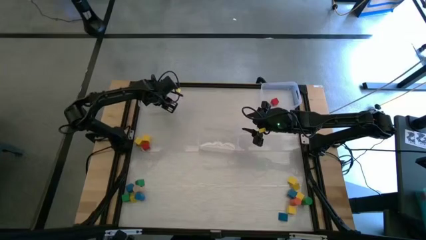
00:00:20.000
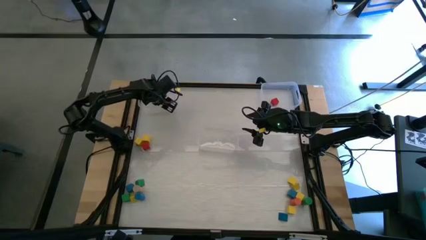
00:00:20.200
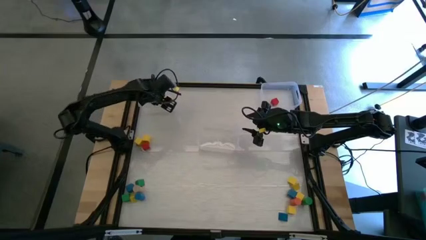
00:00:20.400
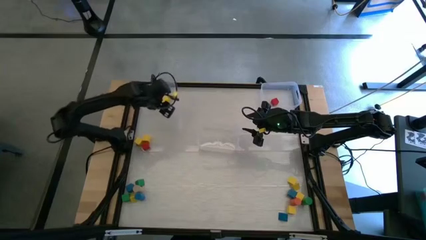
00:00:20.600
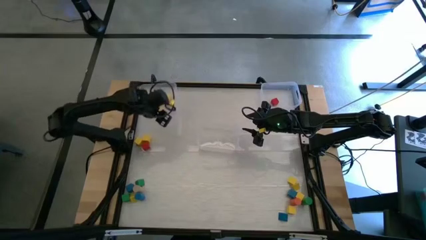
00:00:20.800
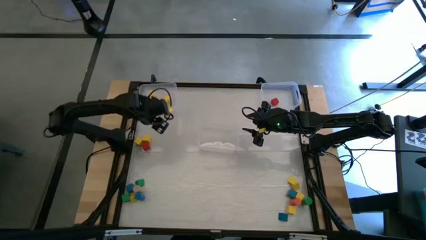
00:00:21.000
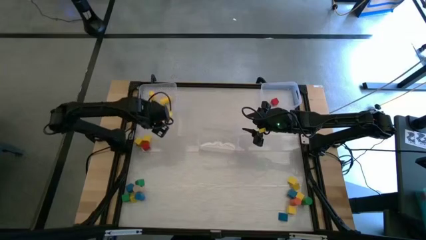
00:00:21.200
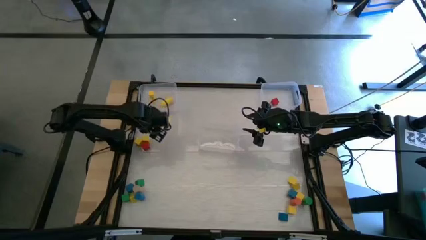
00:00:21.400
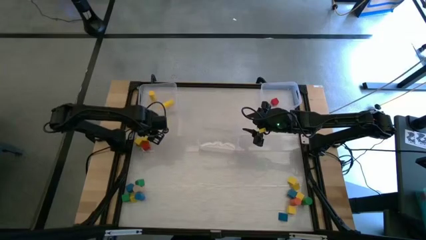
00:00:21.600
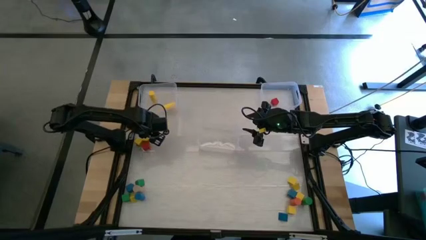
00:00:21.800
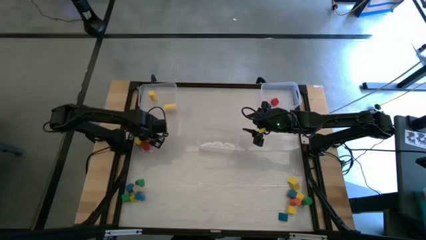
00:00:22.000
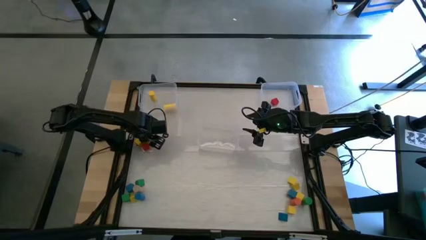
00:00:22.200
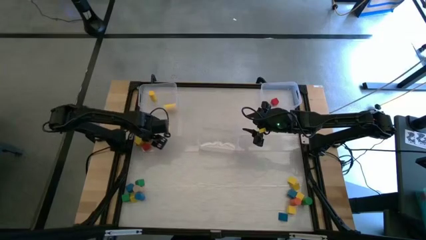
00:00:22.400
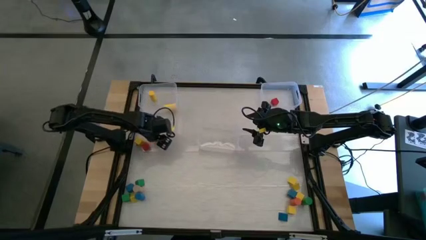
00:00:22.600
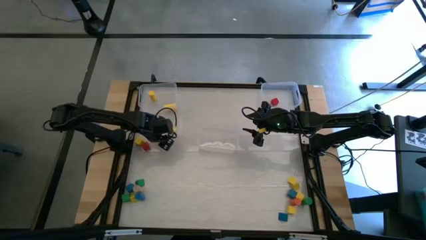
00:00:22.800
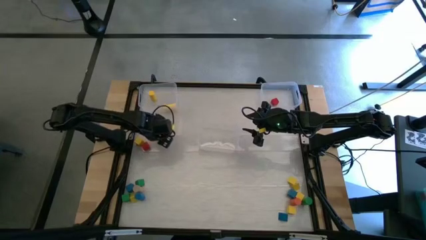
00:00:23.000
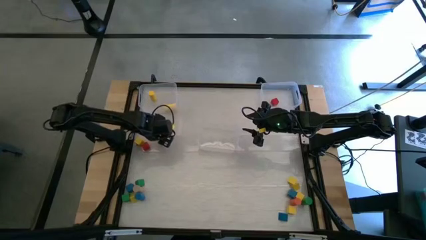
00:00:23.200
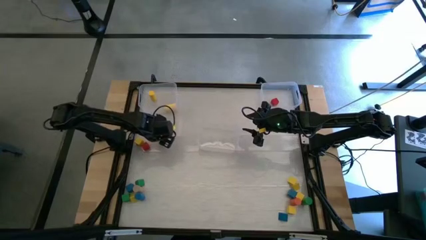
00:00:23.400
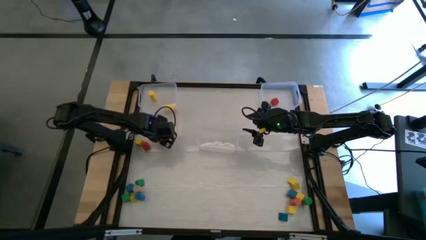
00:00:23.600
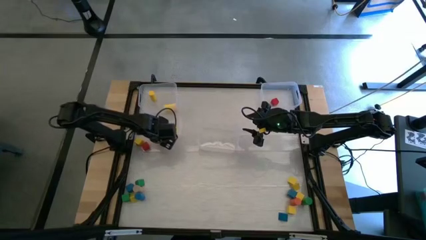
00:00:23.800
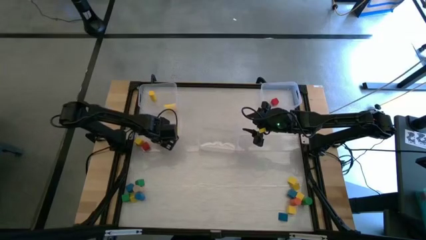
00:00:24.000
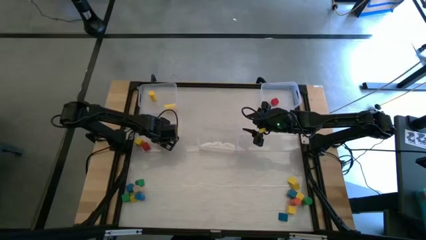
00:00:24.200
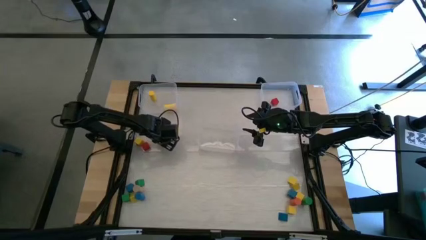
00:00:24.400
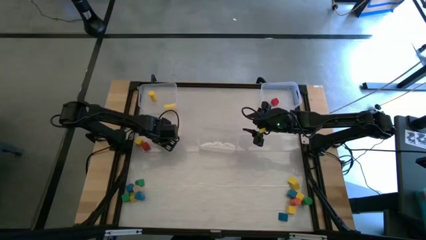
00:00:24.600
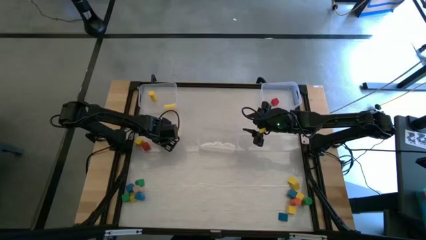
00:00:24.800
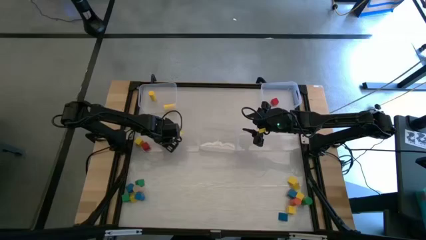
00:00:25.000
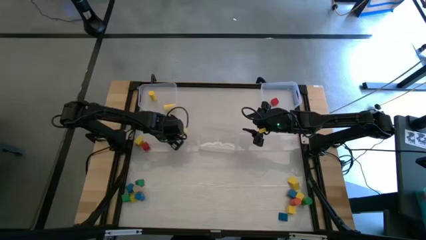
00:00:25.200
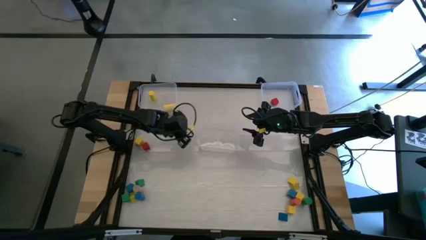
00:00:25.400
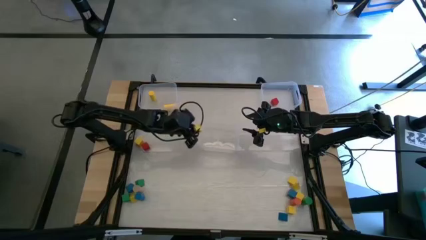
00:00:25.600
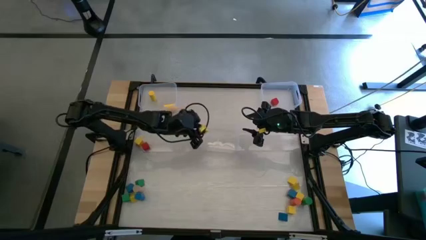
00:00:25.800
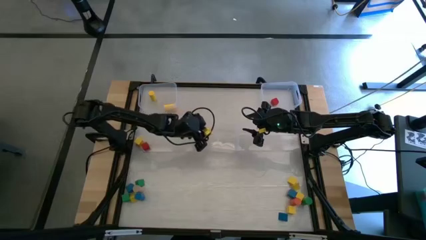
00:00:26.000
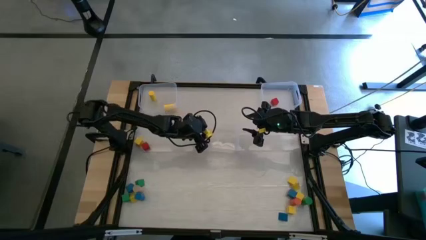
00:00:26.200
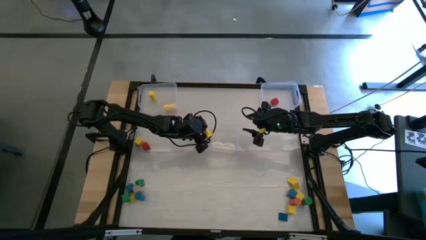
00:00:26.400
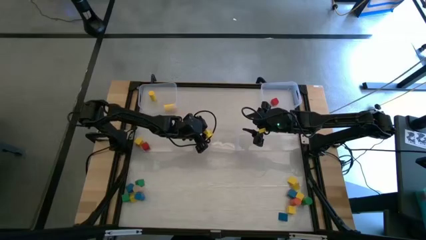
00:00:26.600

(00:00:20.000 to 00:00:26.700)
Task: Sort blocks by size
Put the yellow square block into the bottom transparent bin

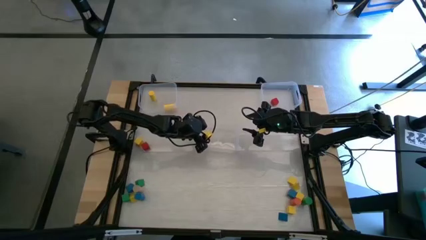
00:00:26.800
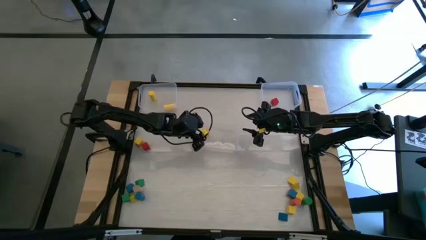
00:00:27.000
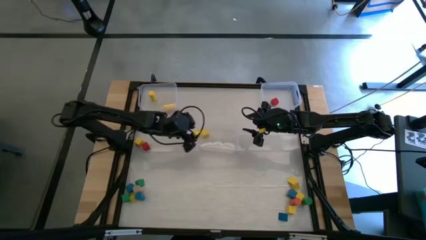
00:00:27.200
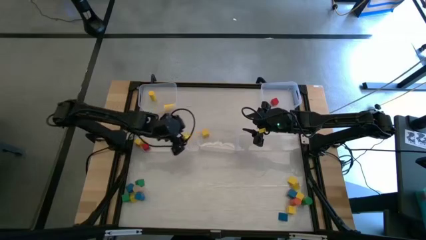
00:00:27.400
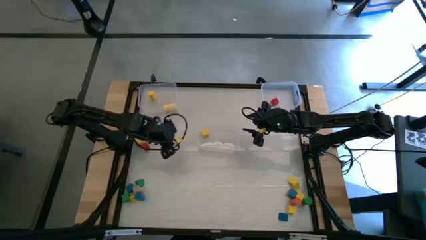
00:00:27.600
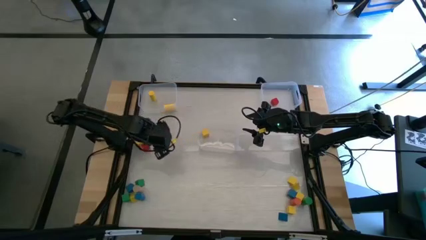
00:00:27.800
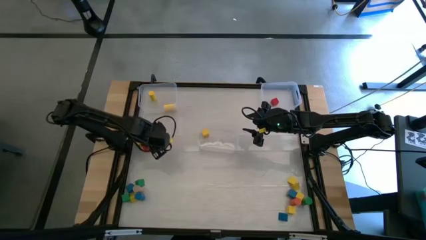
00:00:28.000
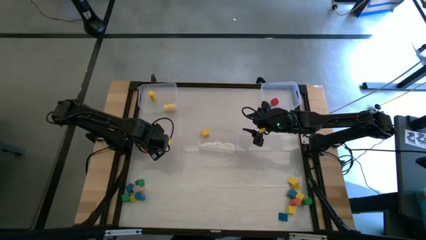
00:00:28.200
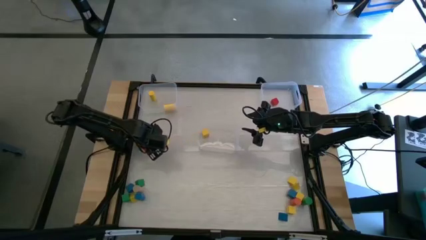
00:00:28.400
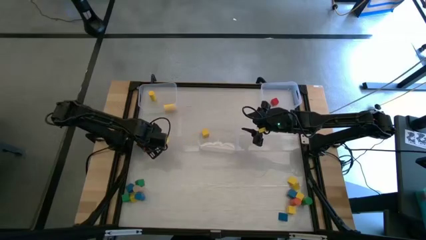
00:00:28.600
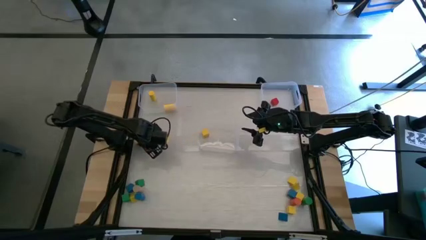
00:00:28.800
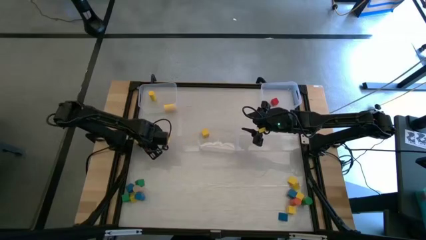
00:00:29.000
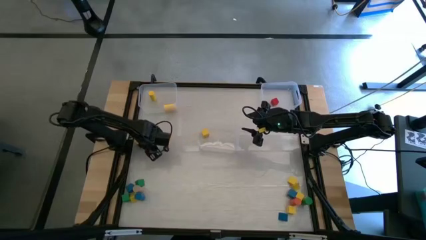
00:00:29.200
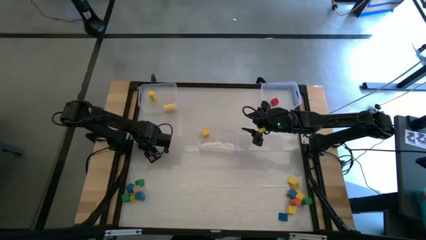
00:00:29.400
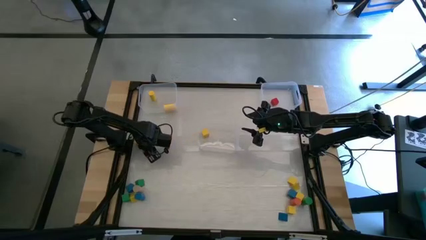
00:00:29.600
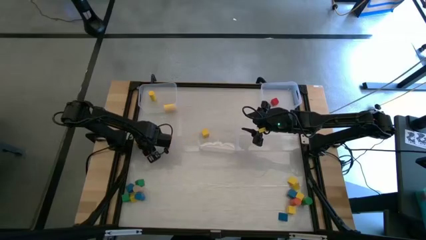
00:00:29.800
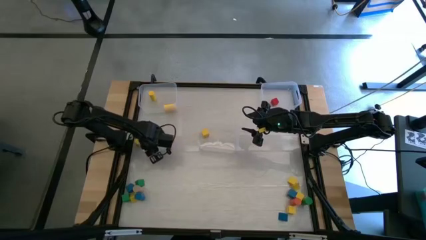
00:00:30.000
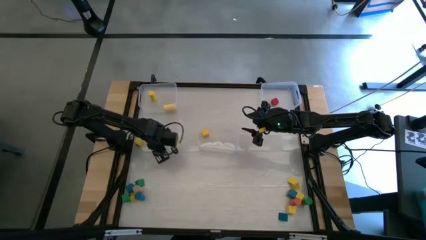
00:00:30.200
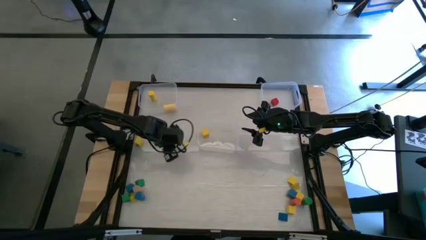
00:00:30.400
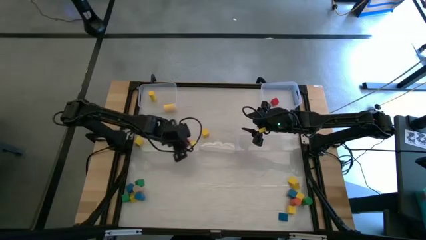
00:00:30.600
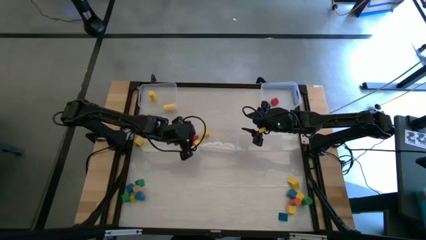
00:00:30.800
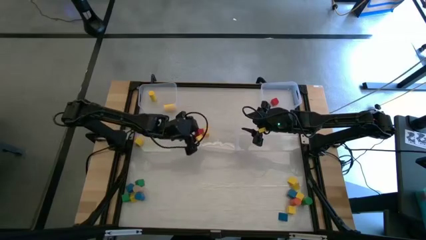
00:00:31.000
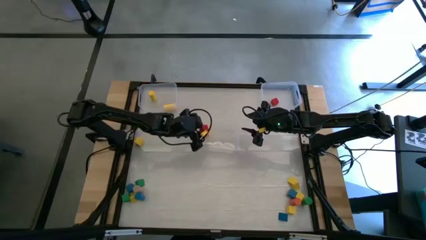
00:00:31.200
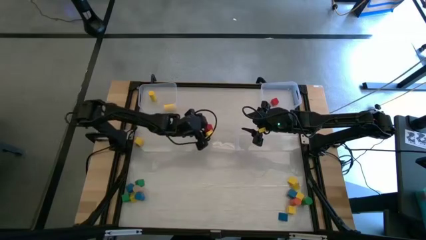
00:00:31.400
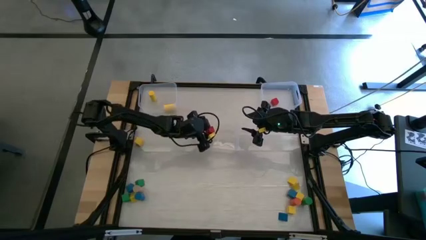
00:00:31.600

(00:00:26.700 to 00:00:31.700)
Put the red square block into the bottom transparent bin

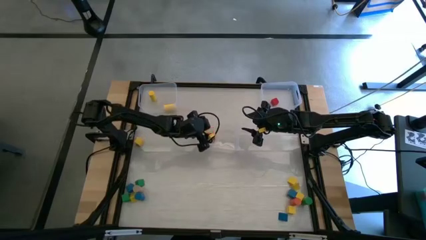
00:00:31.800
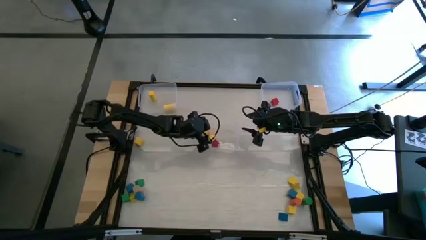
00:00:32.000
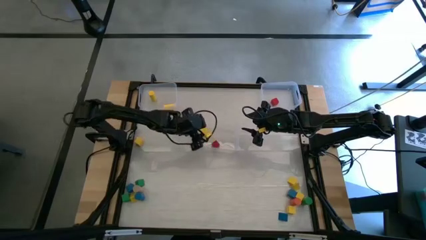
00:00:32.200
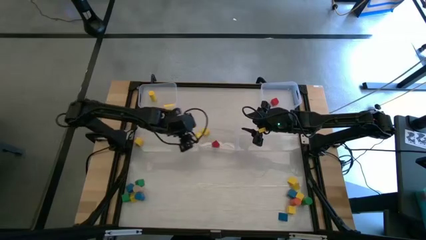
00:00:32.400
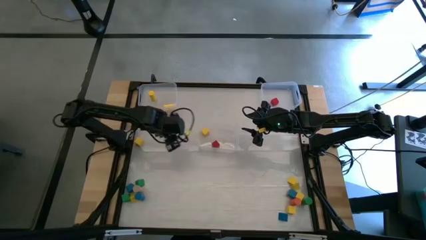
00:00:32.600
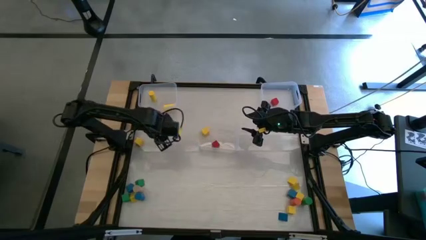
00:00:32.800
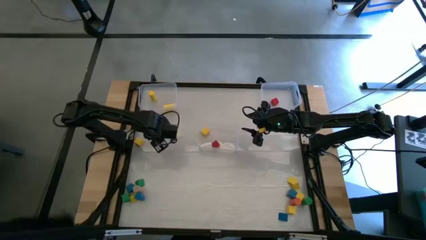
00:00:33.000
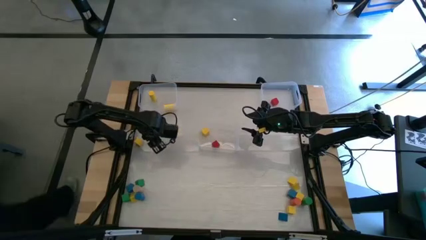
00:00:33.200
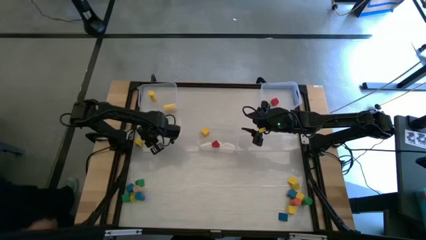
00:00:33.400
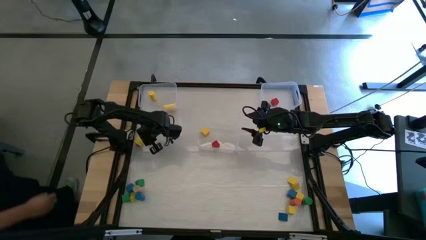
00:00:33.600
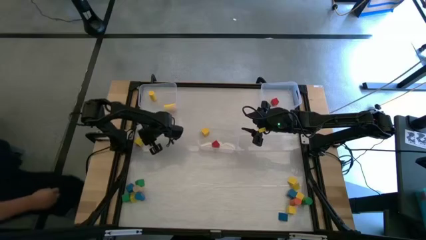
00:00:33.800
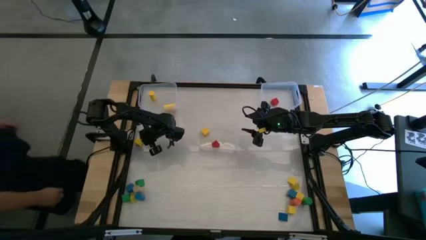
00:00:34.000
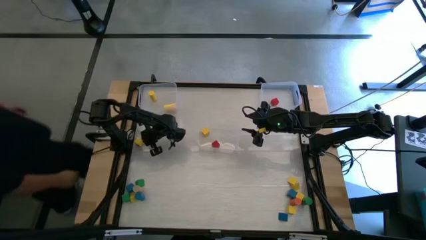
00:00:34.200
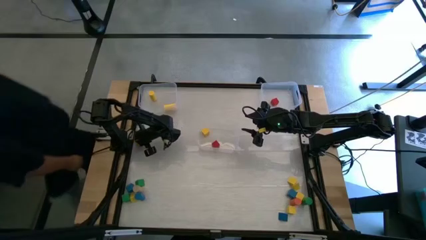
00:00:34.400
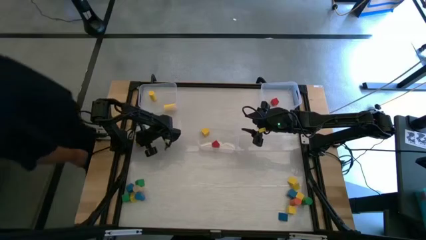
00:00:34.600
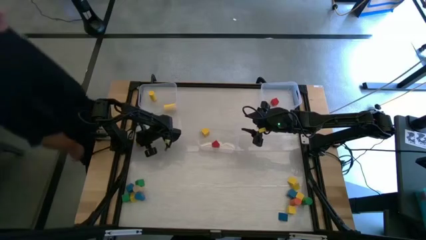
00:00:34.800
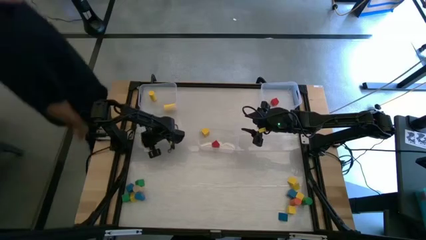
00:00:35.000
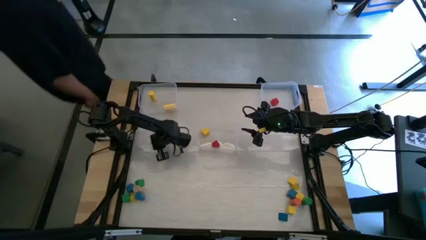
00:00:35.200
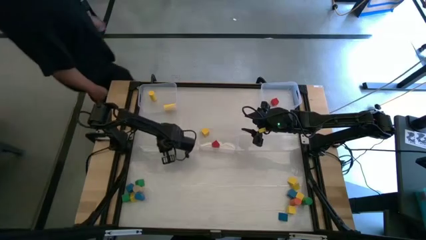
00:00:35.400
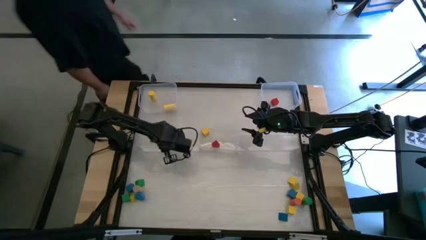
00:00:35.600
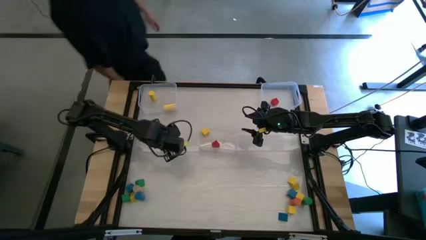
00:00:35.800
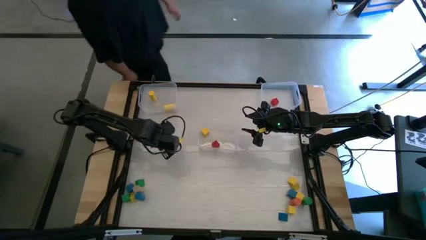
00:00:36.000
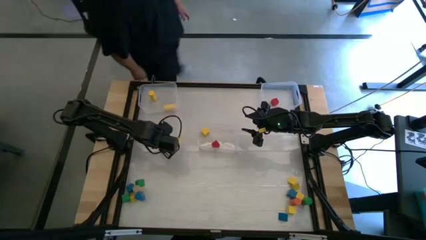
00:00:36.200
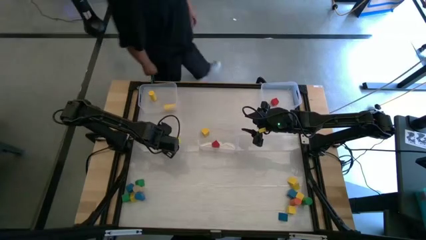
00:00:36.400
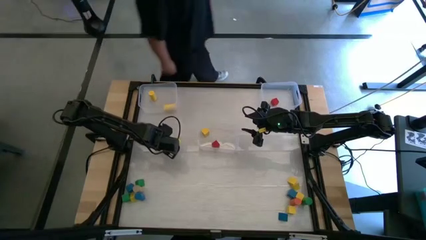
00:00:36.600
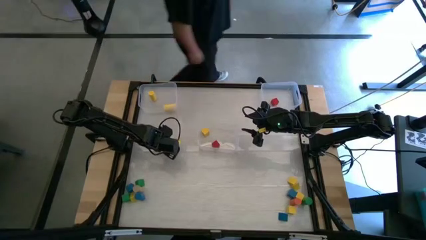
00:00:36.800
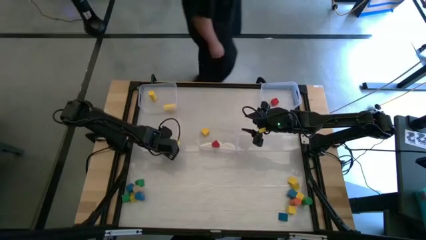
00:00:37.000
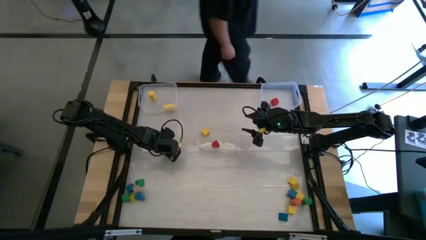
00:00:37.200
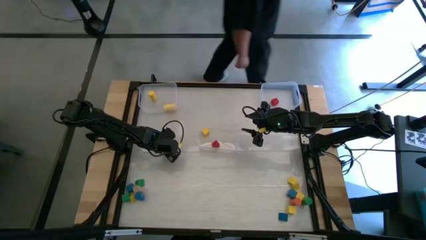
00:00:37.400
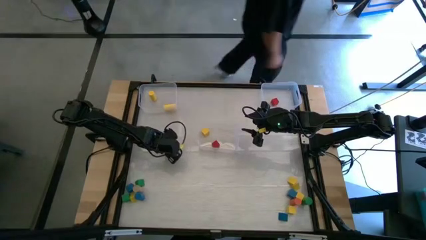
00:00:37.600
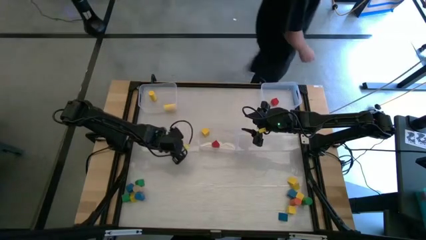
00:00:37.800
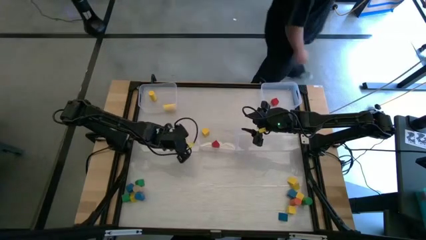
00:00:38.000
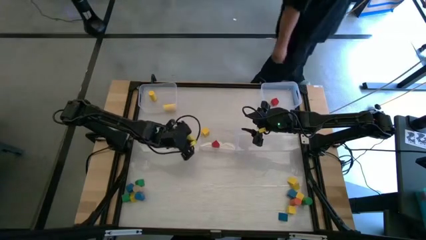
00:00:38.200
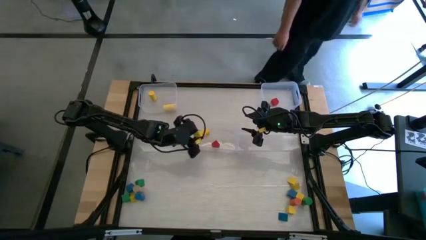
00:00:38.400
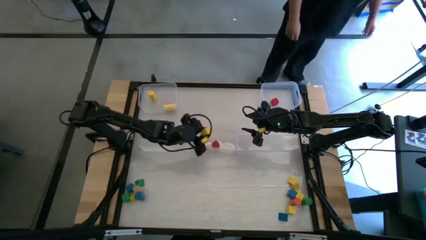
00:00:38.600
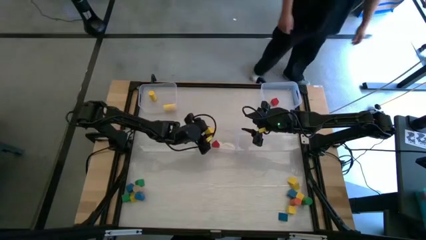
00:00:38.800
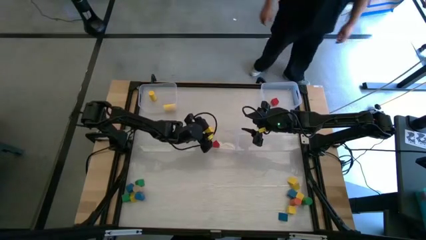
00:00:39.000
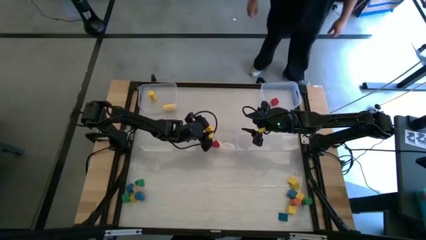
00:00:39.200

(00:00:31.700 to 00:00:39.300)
Put the yellow square block into the bottom transparent bin
